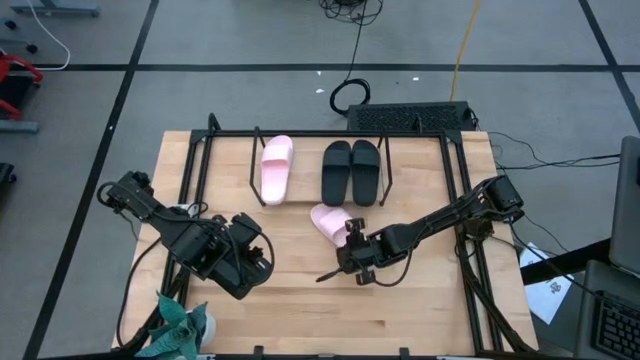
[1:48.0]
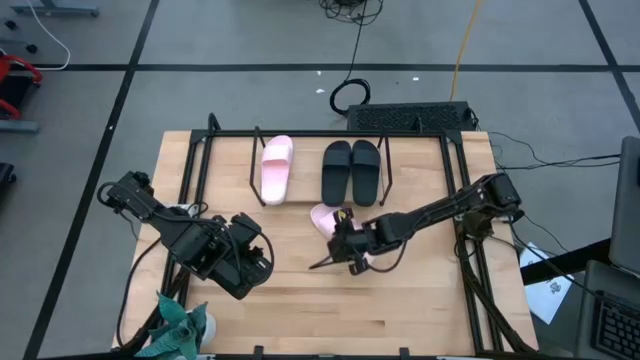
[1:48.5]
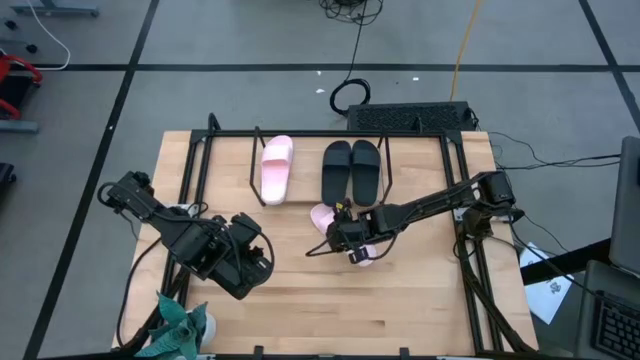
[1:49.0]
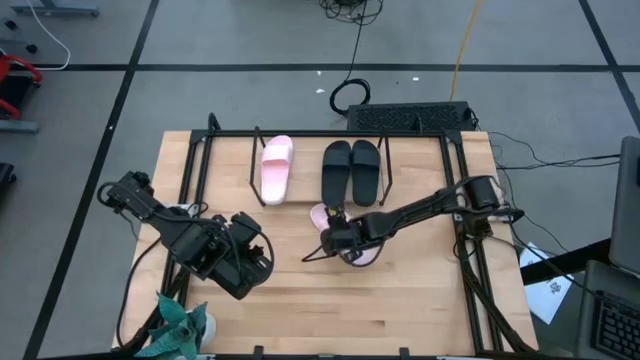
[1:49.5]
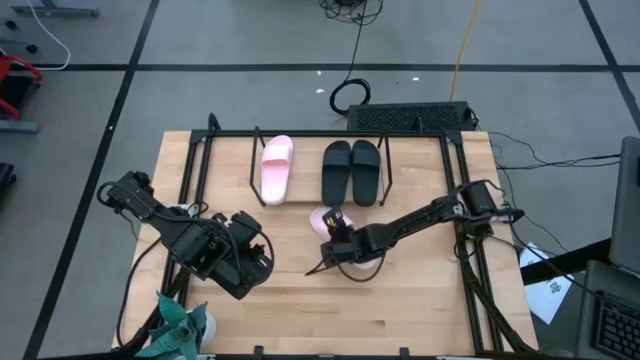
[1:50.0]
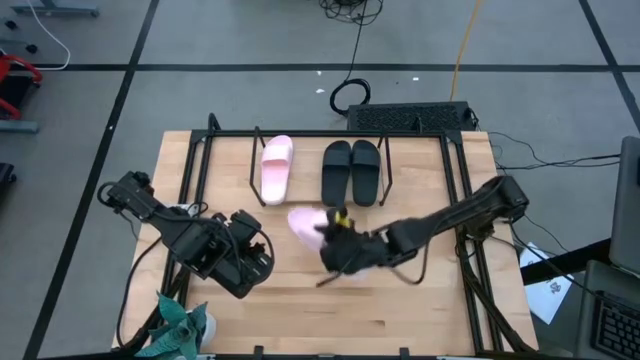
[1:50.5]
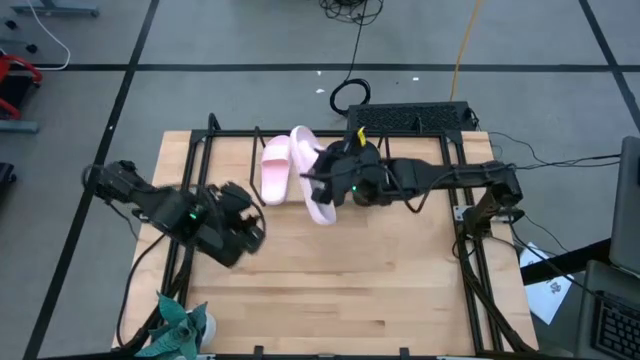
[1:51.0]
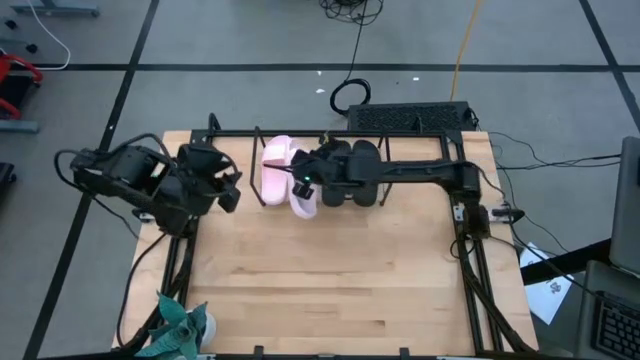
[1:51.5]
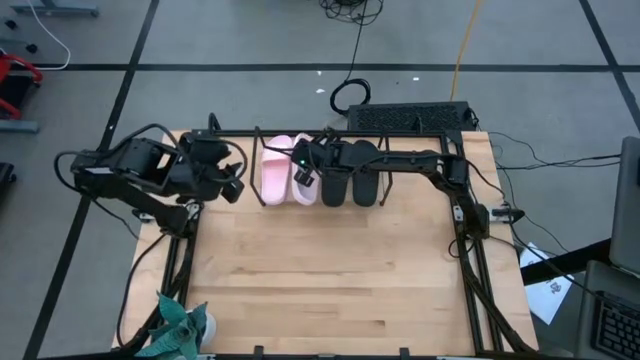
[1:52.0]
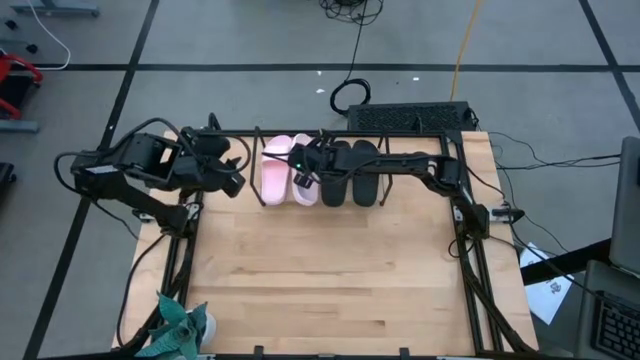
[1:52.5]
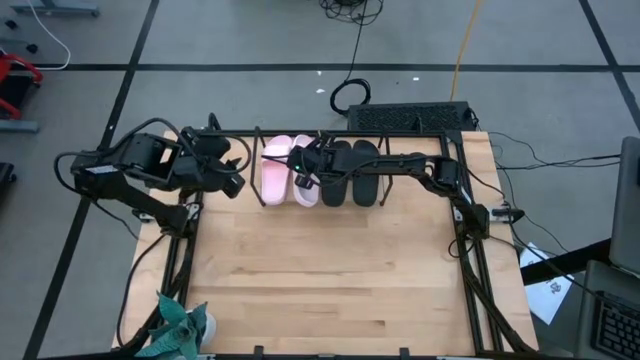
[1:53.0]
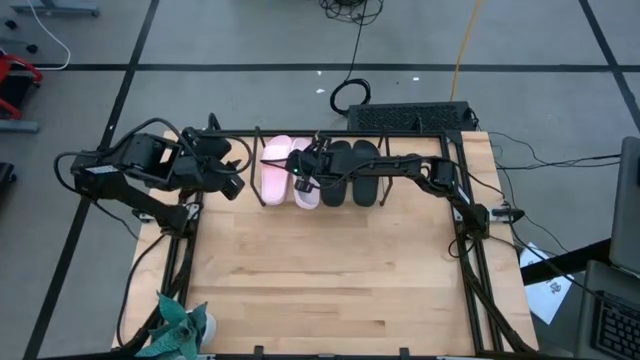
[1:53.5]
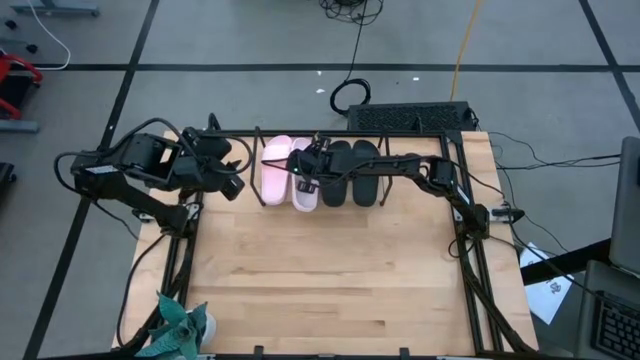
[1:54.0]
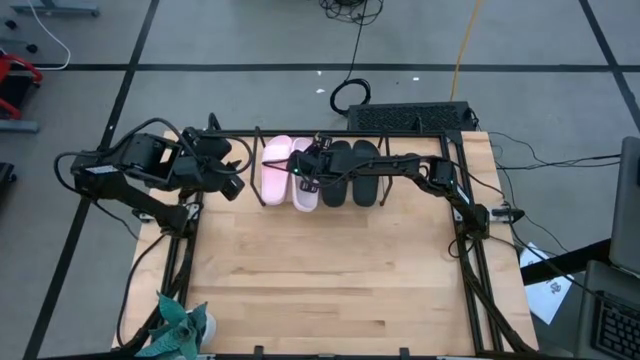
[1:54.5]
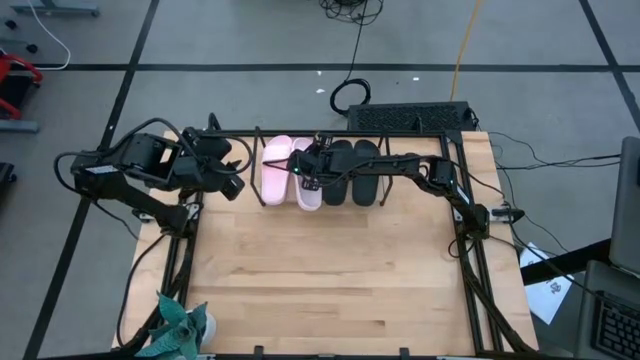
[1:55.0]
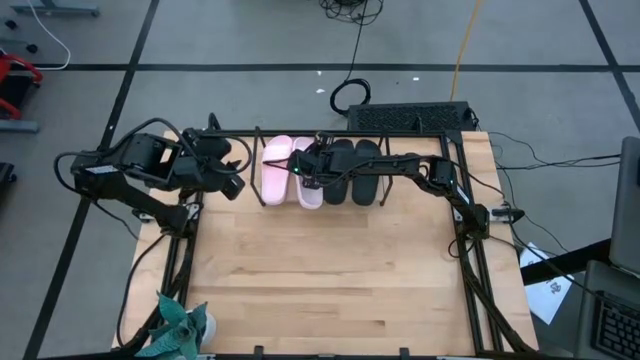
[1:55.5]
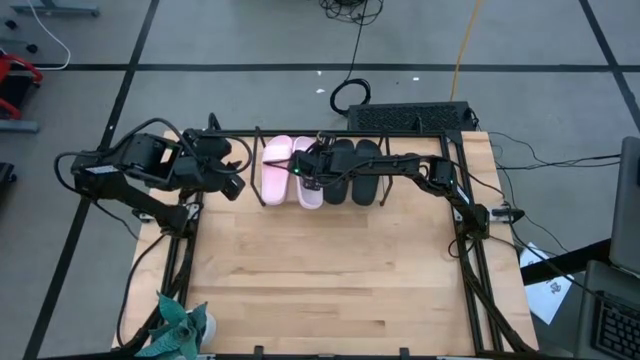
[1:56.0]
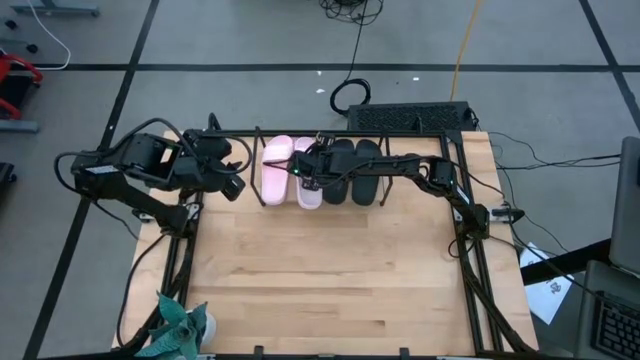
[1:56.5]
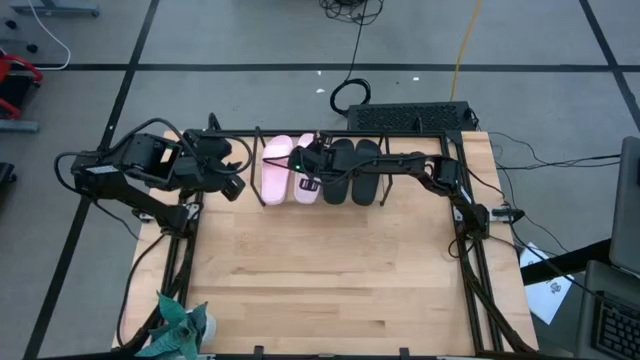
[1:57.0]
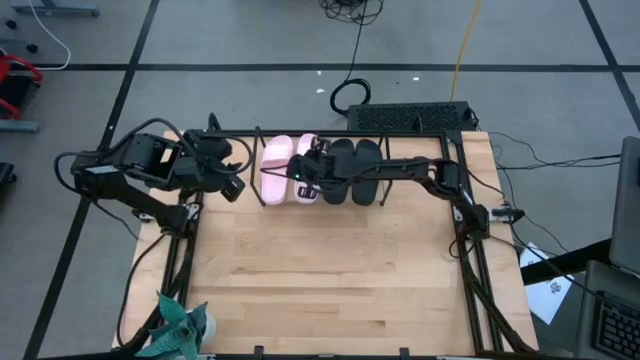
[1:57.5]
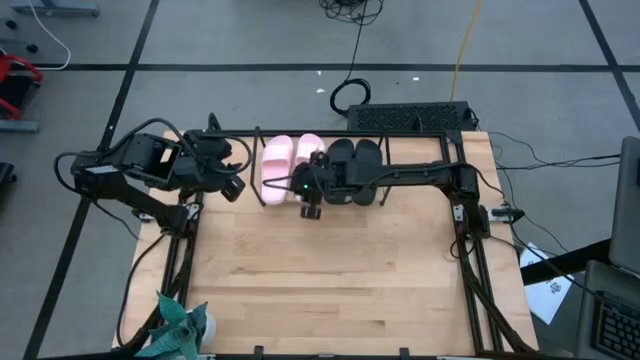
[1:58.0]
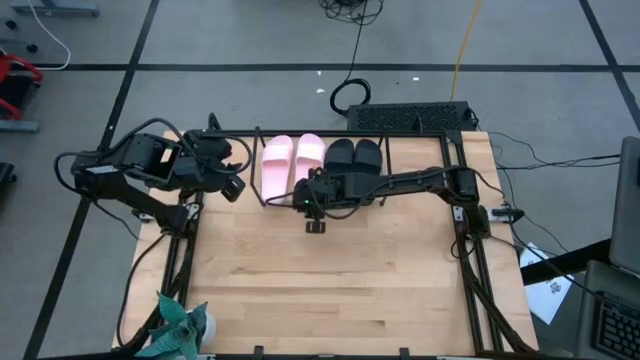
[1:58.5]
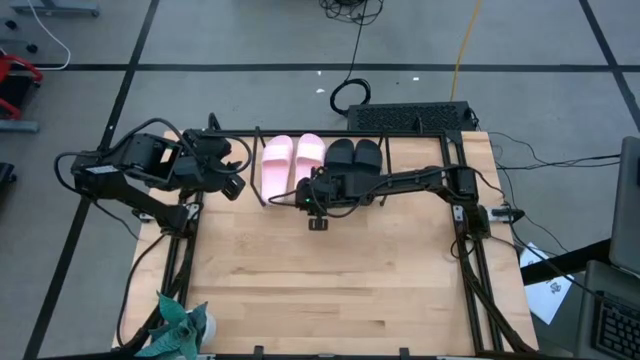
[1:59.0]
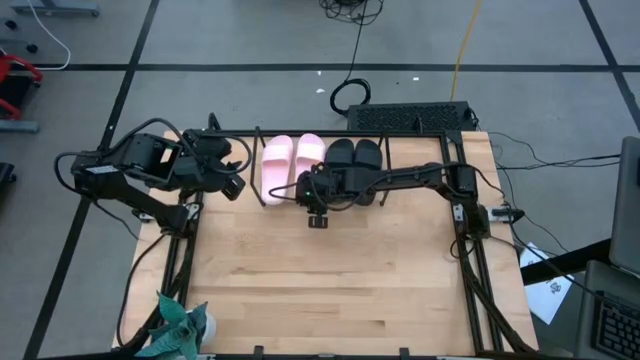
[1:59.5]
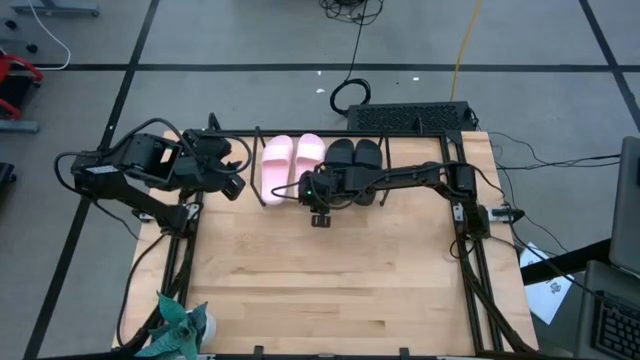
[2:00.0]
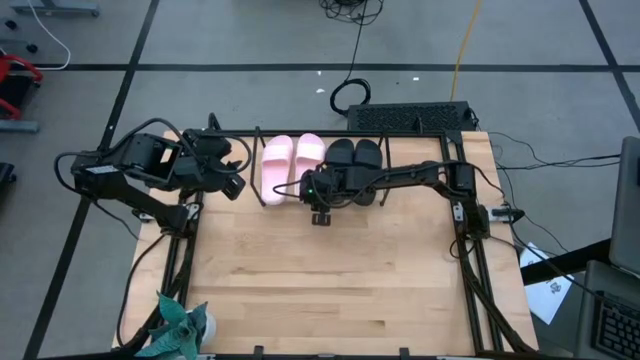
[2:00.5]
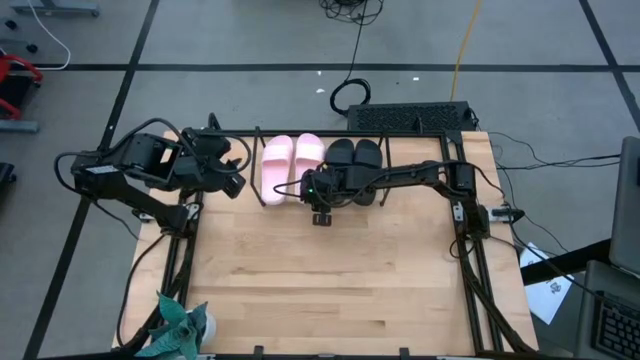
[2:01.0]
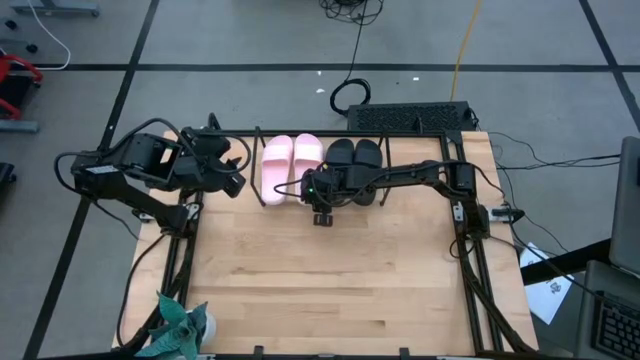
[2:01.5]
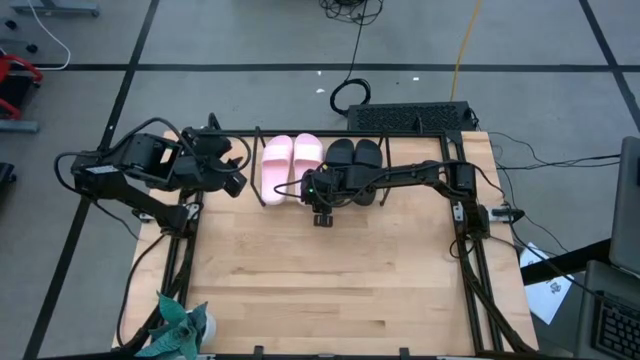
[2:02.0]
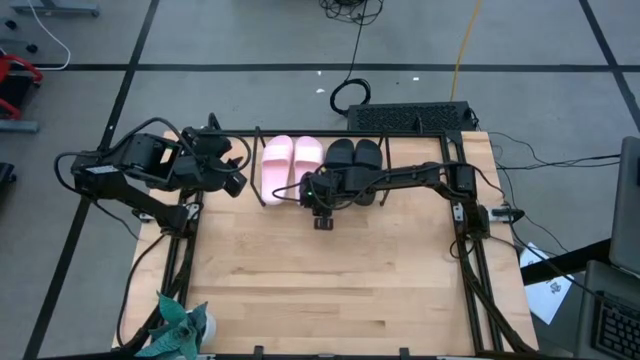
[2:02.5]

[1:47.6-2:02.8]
Task: Pick and place slides into the shelf
Put the pink slide on the shelf

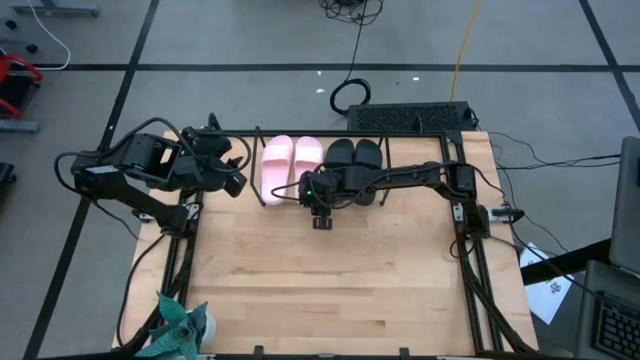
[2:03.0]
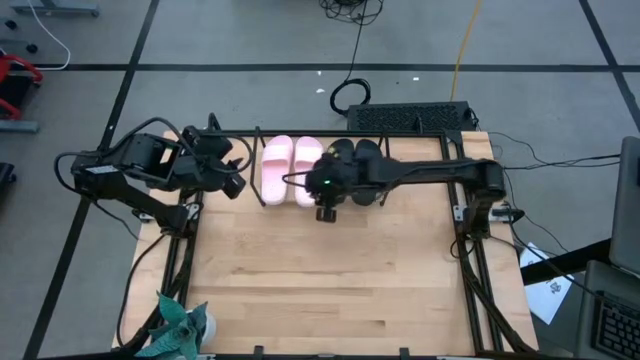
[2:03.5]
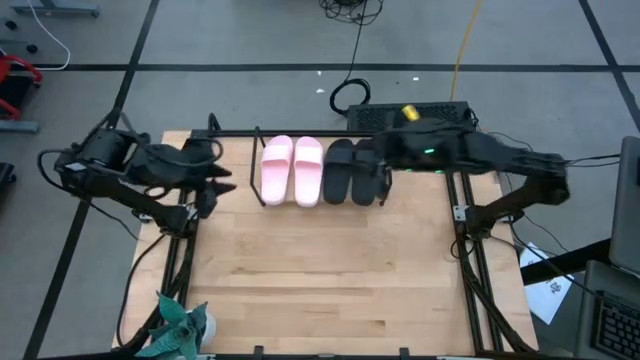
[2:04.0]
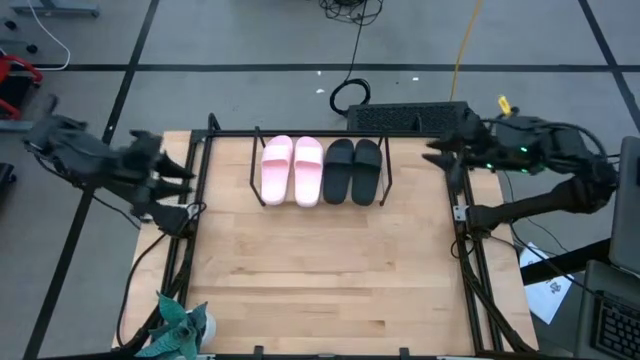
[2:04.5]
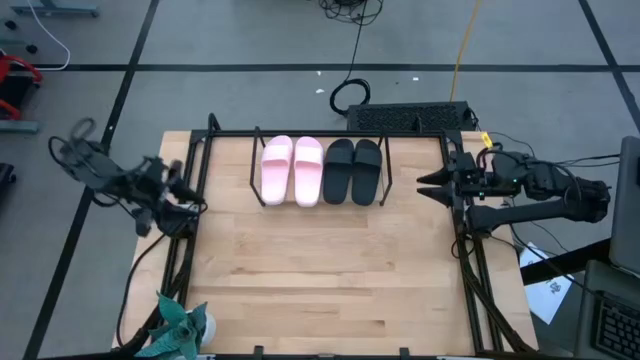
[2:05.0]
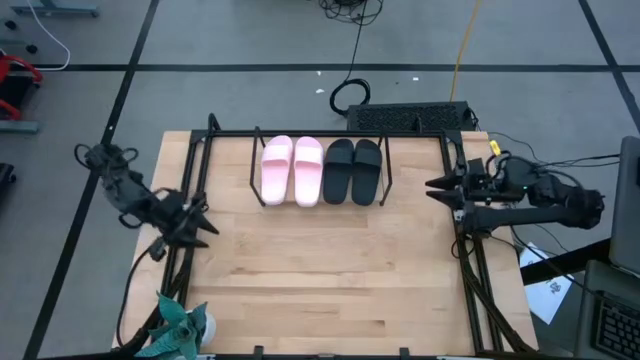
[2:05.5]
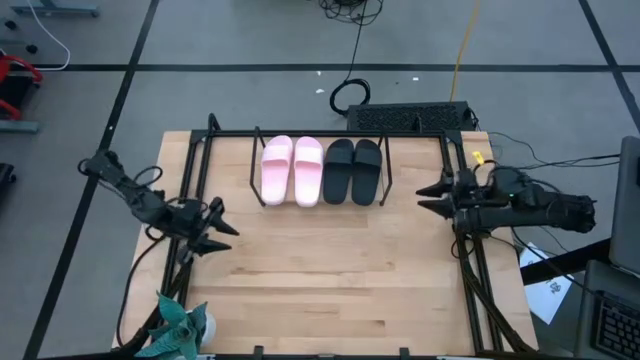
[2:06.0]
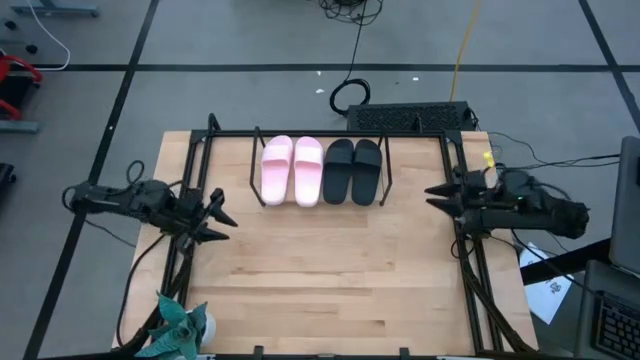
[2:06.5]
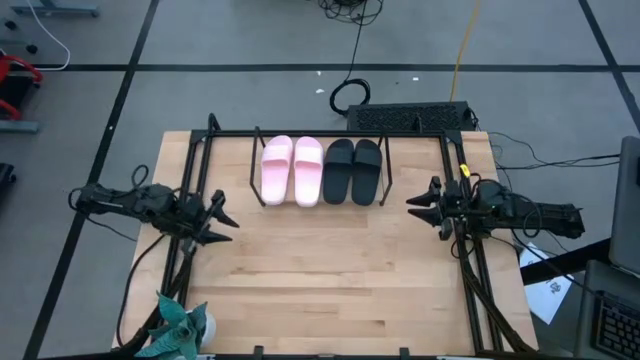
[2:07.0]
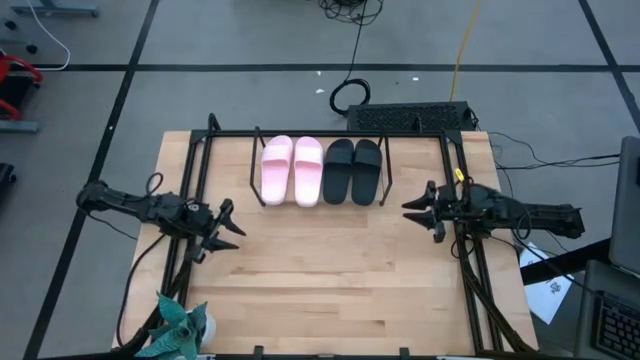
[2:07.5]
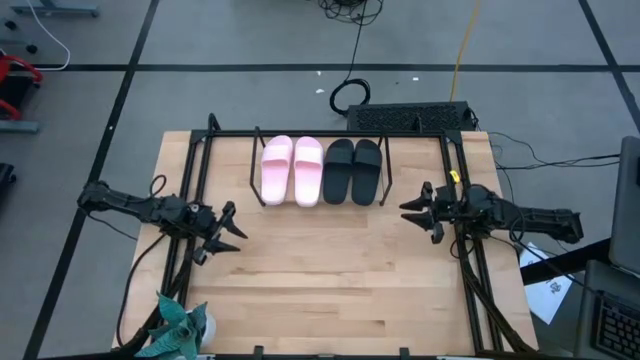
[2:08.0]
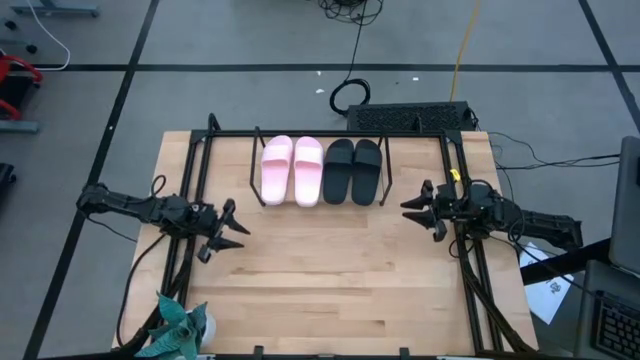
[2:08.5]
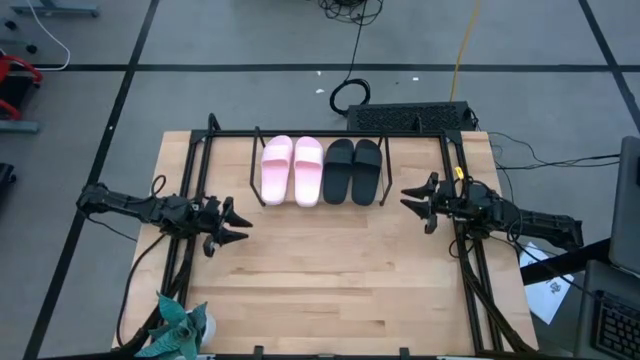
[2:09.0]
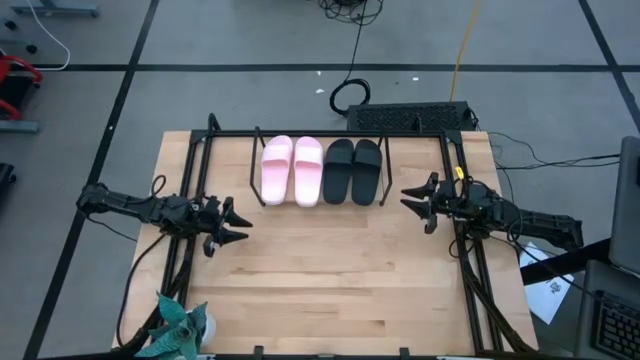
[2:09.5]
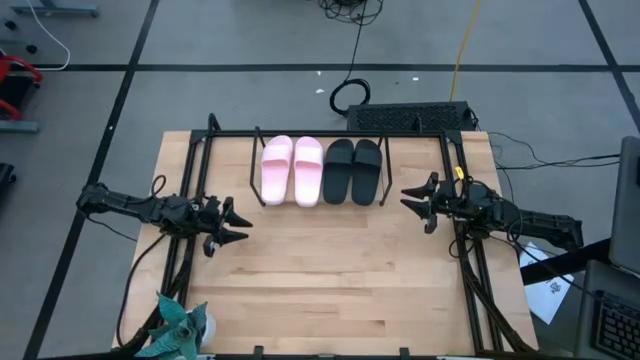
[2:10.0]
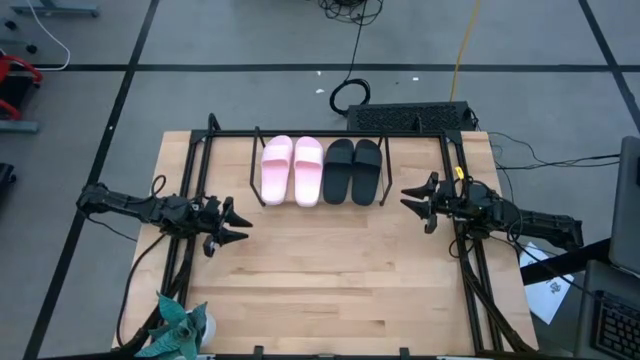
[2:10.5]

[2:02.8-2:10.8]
Return to Home Position
